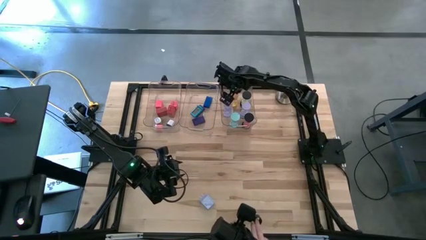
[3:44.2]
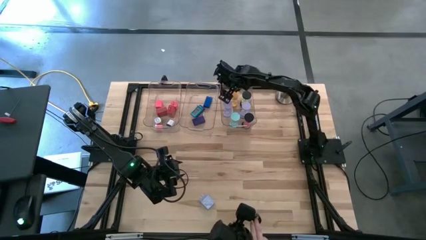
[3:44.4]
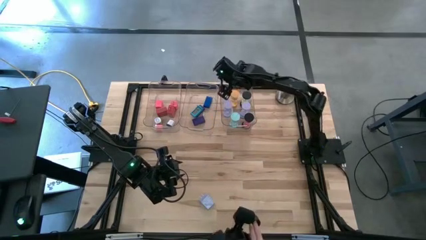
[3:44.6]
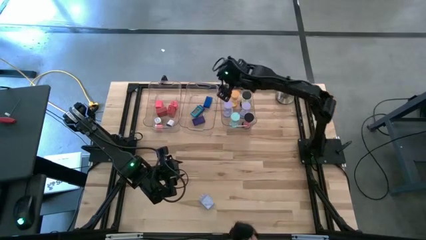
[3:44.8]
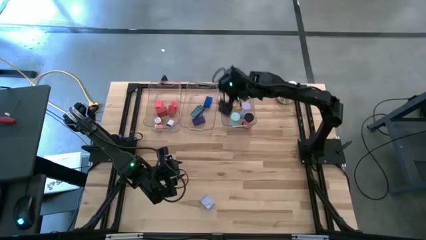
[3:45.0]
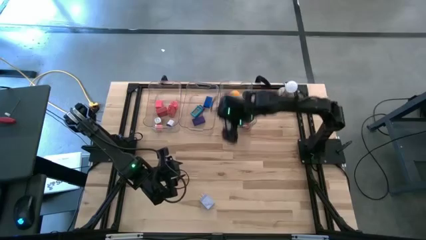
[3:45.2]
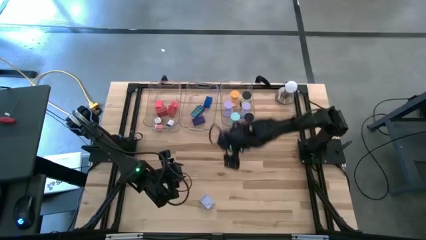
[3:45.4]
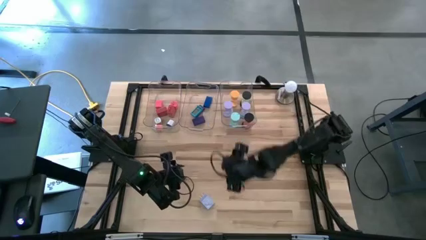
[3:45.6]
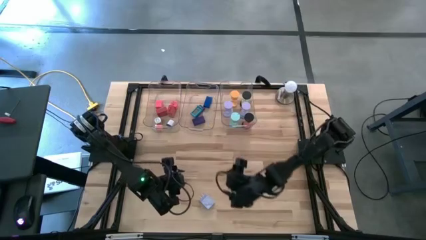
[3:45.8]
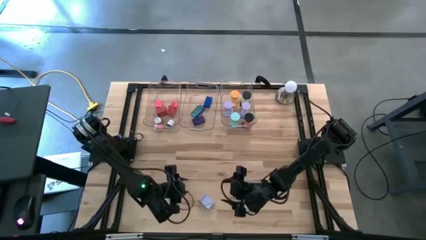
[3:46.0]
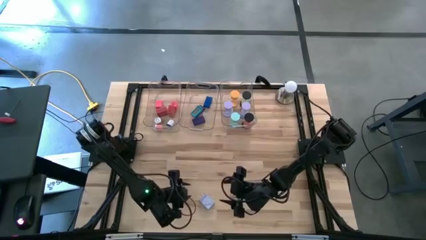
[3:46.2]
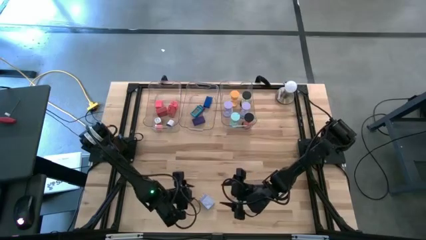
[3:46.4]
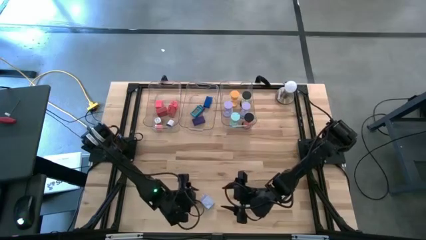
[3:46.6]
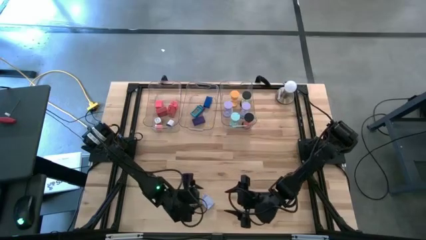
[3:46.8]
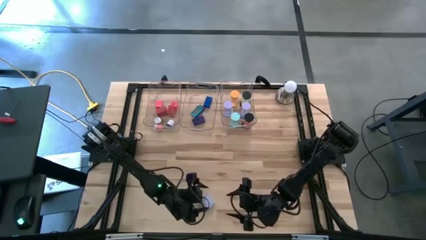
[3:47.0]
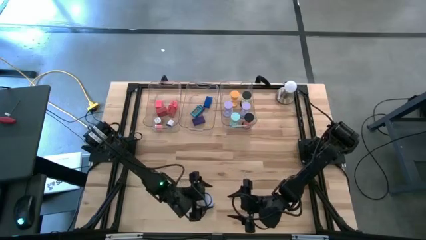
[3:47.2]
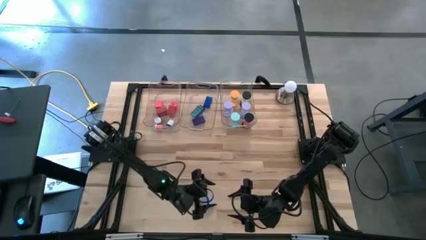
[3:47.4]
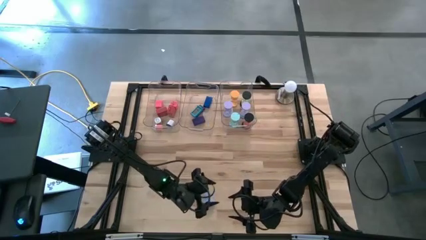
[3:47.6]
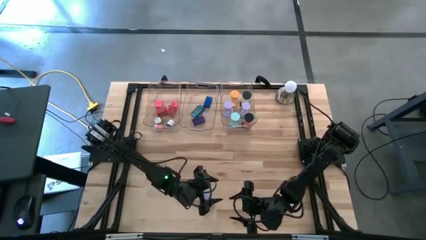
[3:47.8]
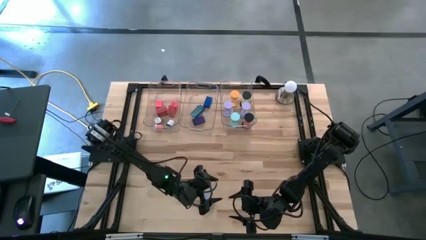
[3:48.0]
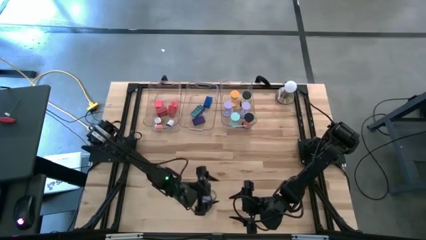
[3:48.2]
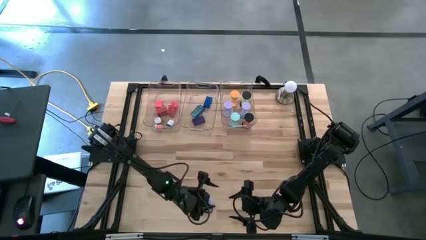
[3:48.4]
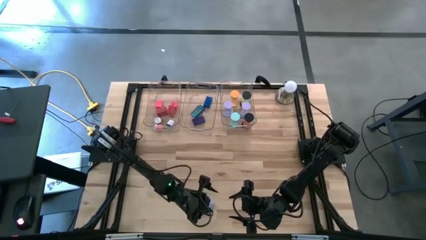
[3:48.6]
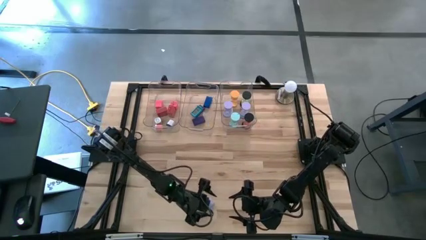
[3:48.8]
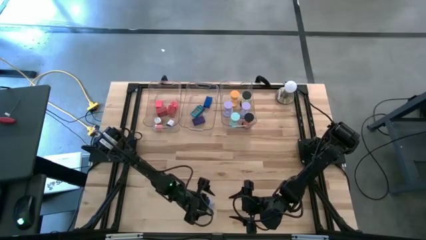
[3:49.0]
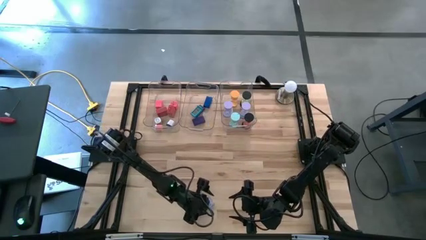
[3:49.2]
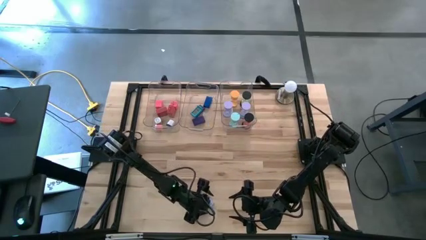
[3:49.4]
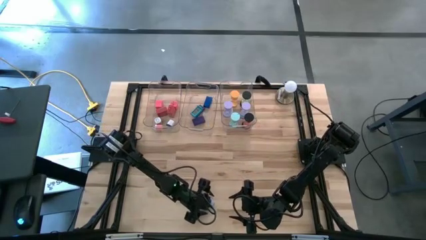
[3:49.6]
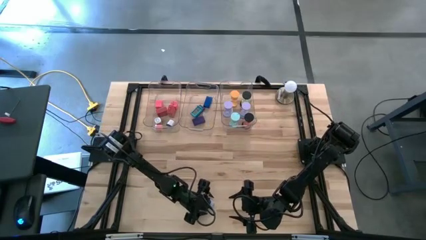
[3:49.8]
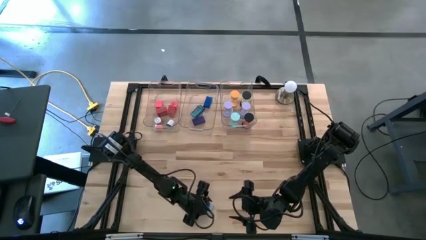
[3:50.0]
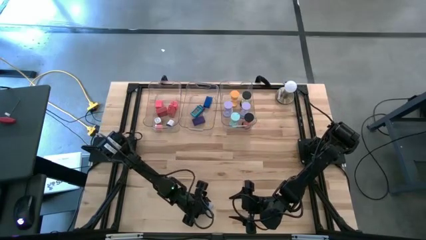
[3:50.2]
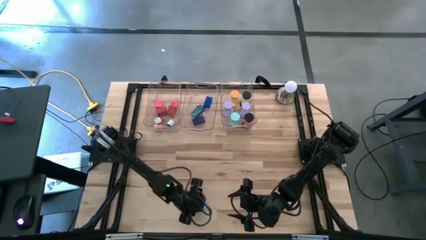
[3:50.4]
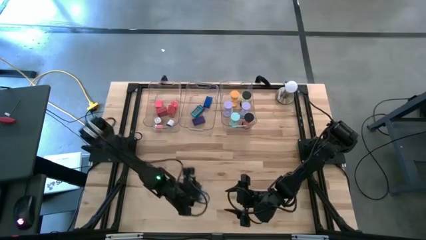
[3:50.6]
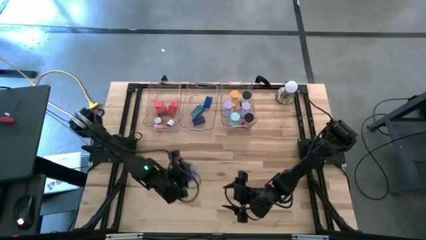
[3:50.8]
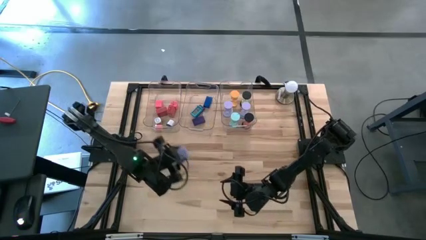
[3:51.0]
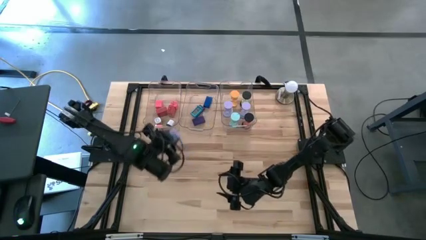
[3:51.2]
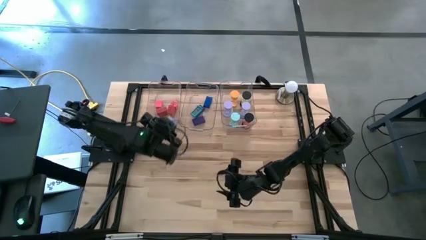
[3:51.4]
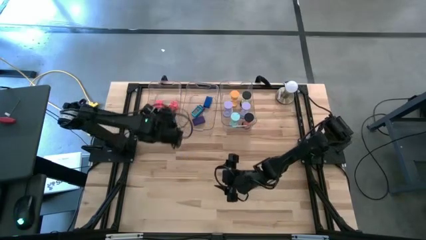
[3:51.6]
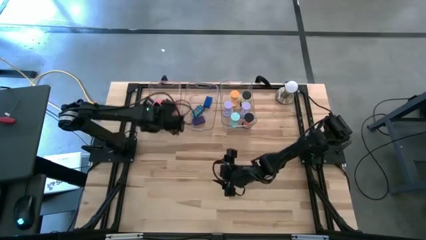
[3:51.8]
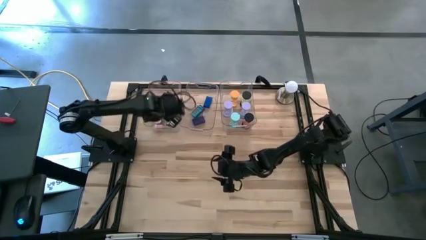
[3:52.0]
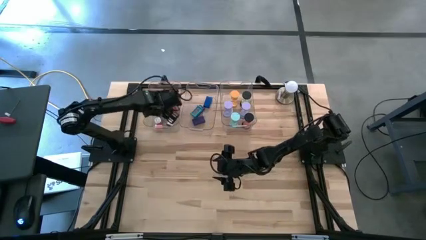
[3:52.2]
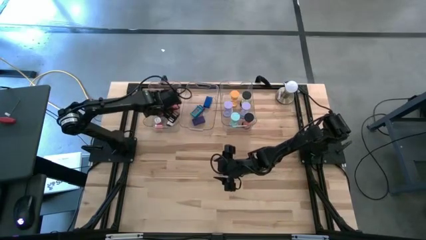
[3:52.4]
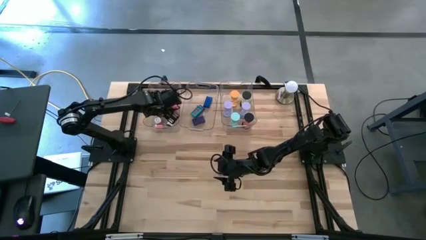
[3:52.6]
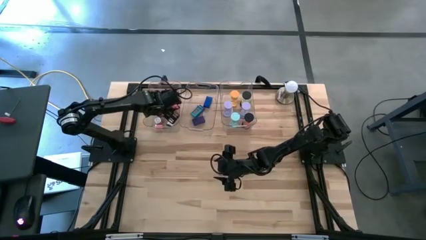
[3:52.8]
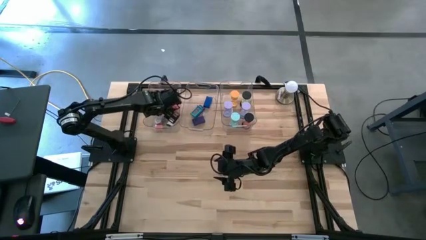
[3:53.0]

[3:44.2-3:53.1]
Task: Pick & Place Office items
Put the purple charger adapter into the left transparent bin

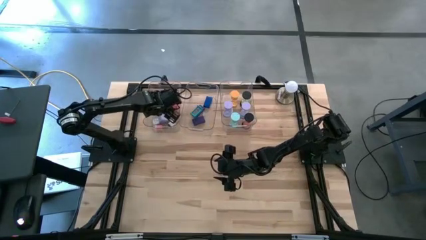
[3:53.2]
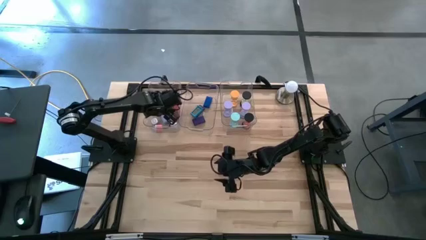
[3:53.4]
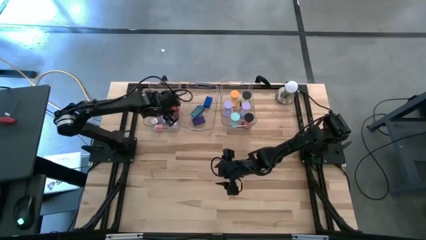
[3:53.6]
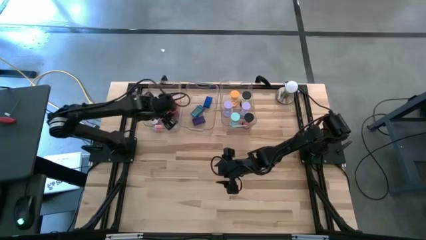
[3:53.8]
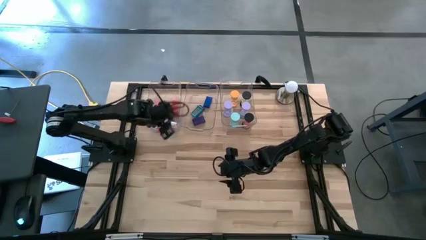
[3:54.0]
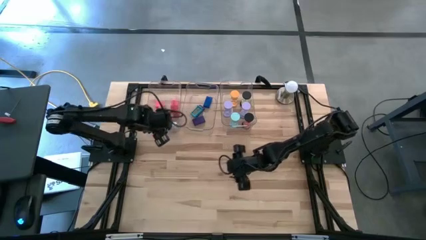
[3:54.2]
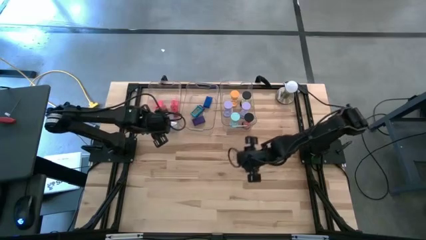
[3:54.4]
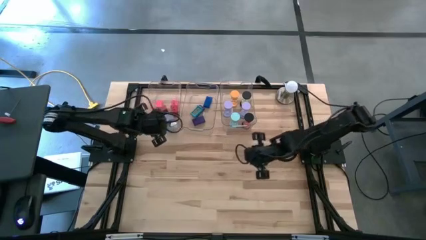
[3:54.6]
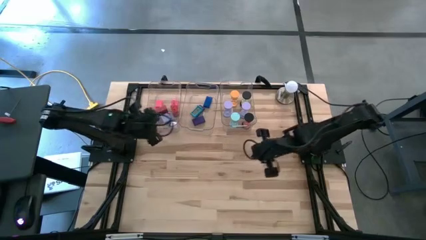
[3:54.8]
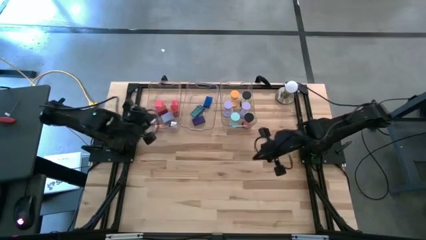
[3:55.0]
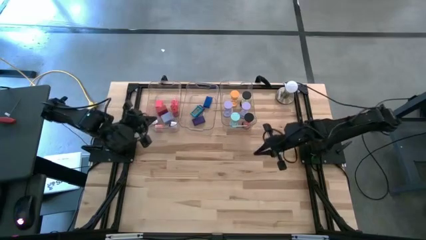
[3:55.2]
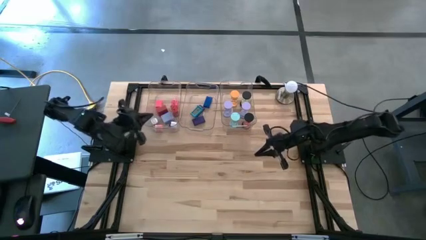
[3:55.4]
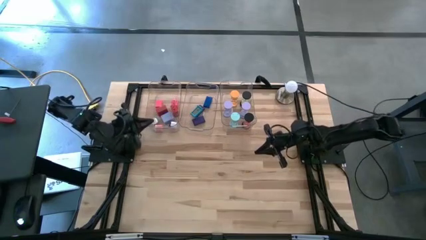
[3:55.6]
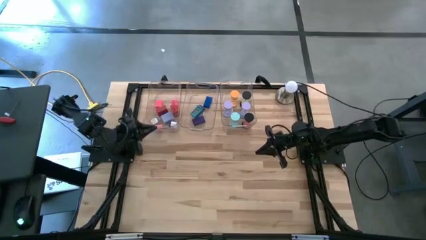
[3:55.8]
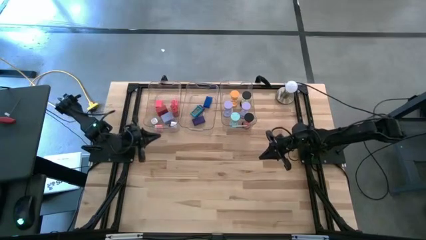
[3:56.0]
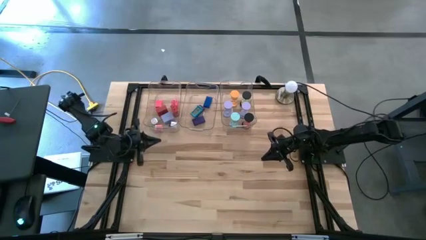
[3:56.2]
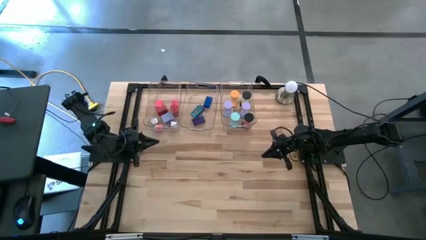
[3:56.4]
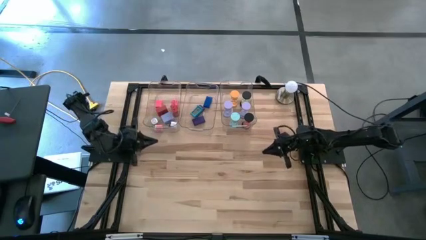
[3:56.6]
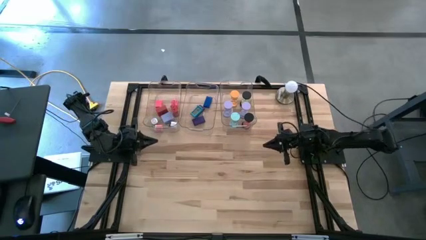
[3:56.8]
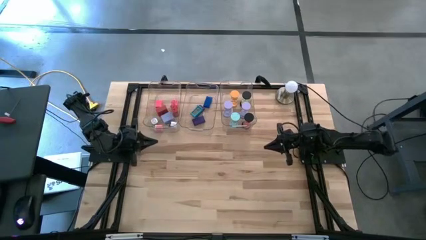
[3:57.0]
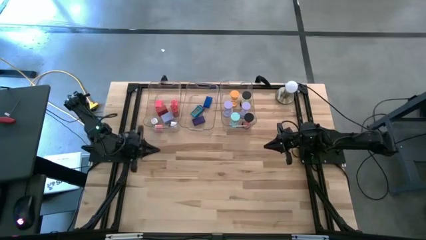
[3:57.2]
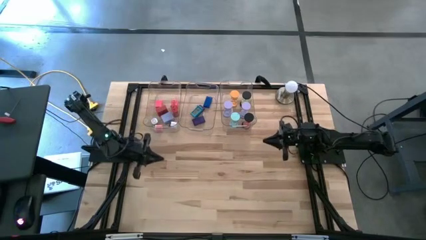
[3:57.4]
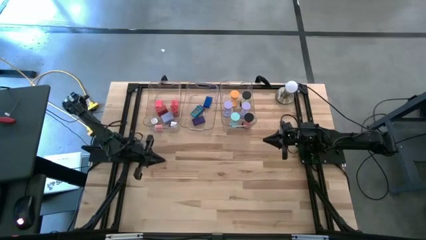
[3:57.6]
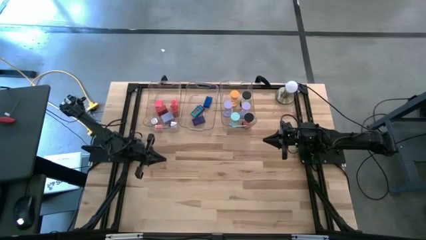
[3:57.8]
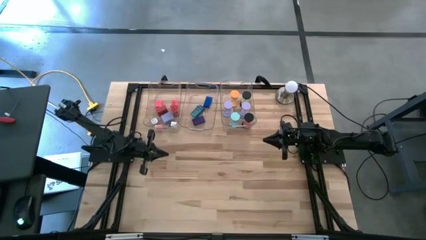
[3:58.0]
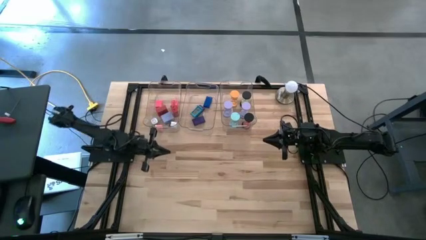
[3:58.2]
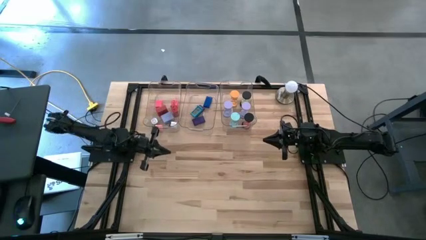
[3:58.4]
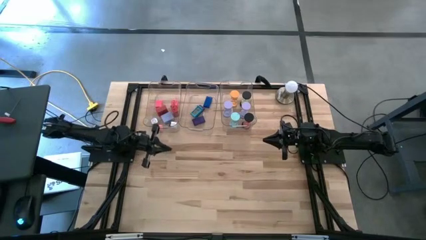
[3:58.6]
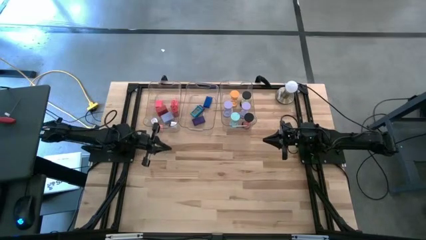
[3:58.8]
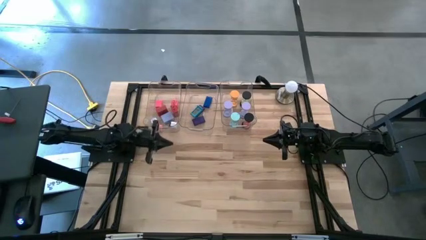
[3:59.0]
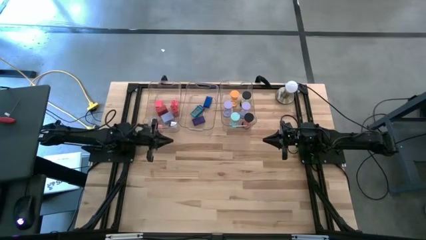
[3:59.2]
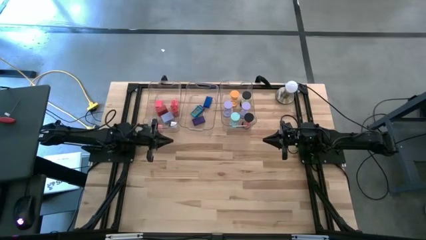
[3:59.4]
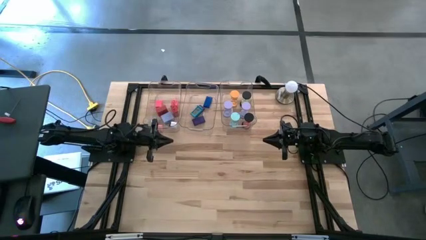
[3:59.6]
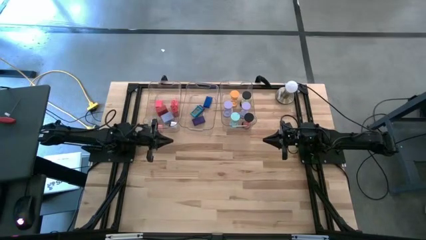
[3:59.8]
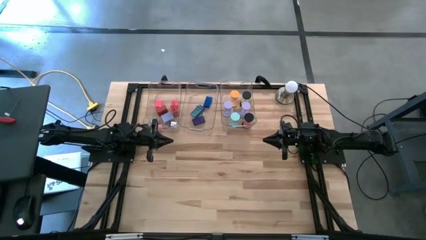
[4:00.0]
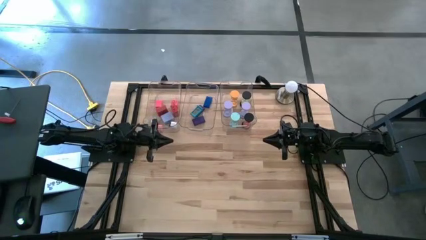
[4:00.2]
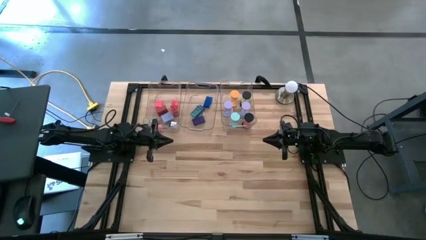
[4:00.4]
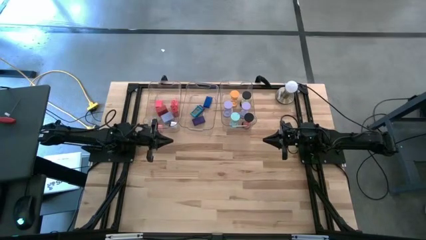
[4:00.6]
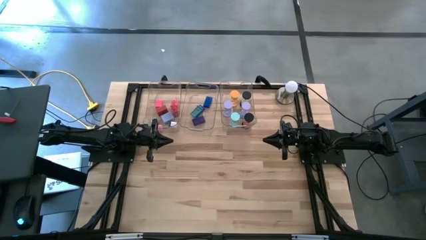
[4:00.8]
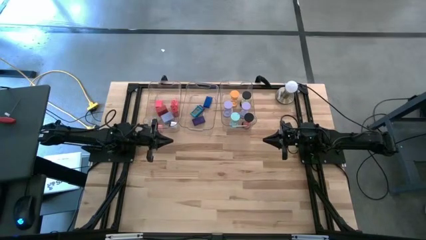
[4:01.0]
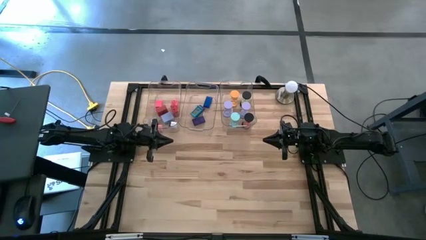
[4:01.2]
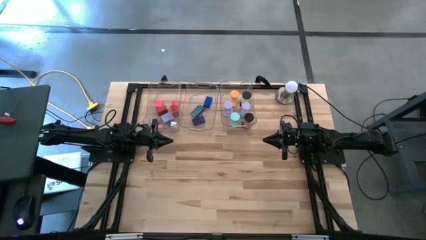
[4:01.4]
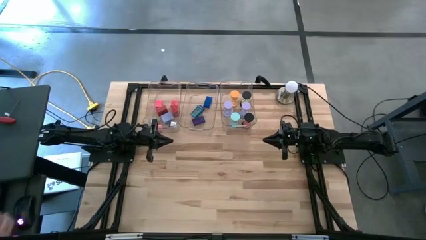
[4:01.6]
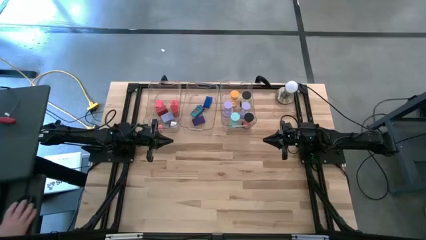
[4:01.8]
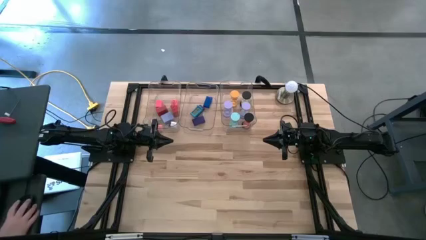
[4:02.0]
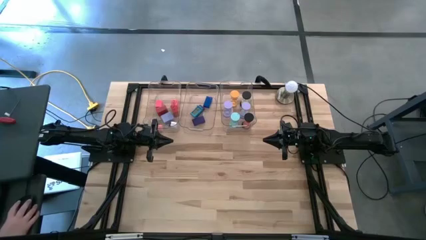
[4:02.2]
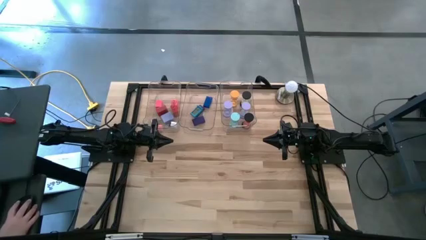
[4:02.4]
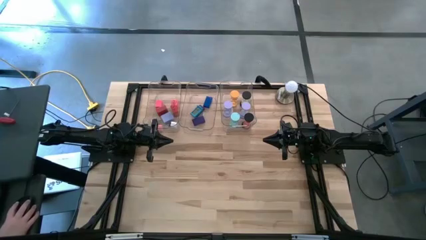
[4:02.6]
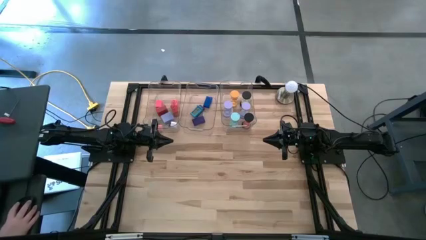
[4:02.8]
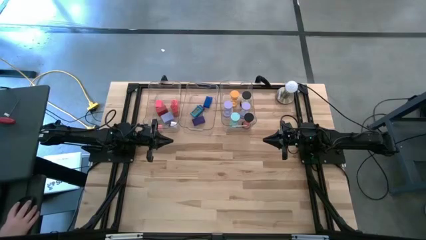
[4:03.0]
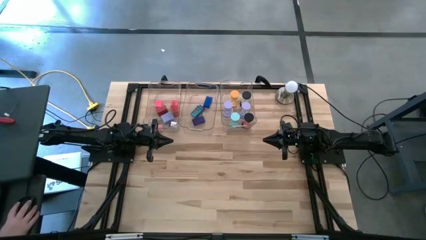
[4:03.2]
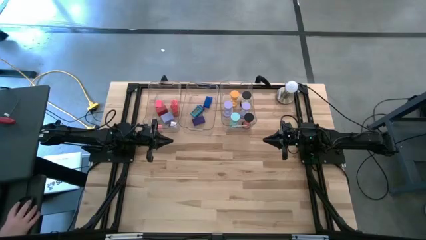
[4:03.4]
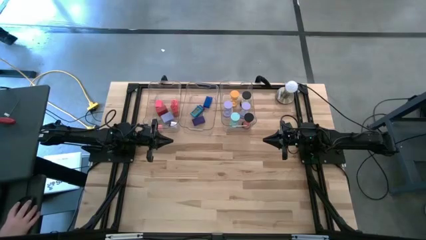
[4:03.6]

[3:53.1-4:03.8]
Return to Home Position
